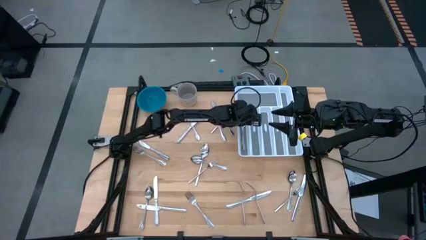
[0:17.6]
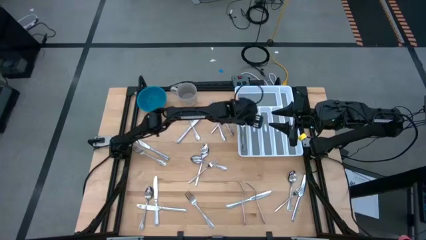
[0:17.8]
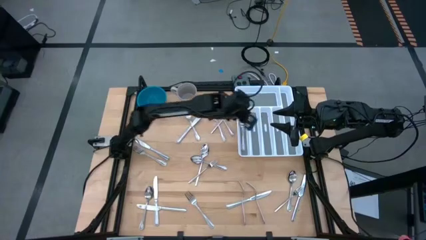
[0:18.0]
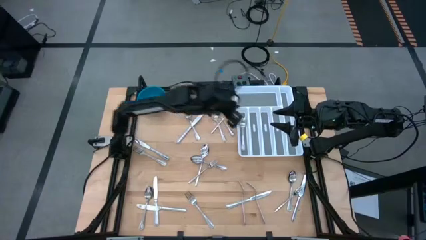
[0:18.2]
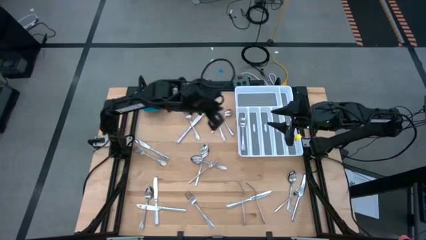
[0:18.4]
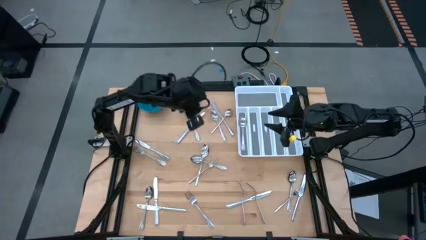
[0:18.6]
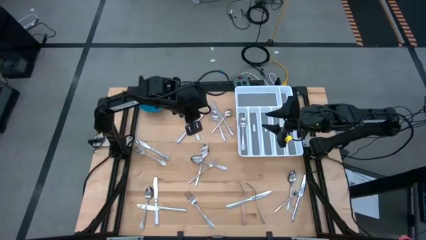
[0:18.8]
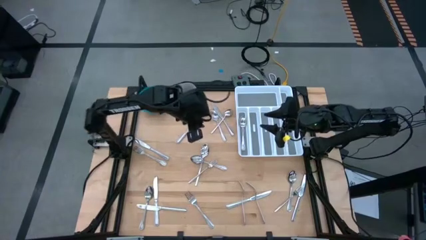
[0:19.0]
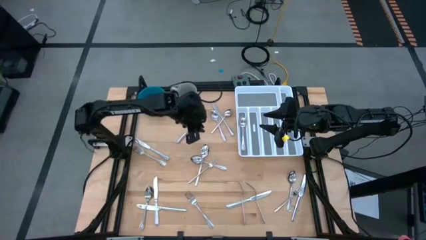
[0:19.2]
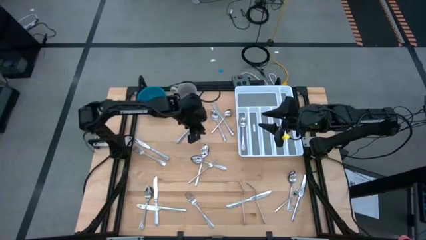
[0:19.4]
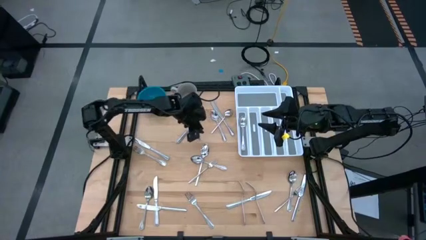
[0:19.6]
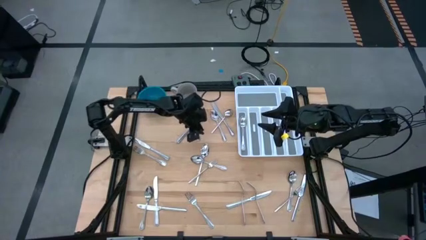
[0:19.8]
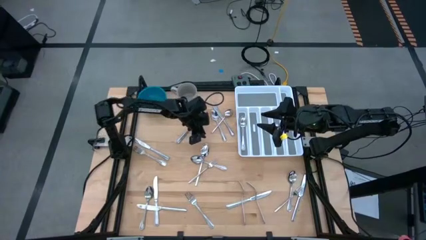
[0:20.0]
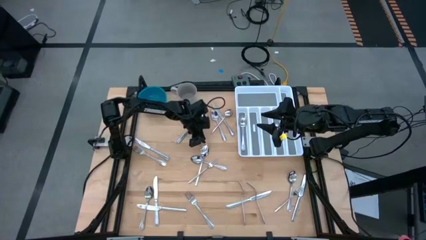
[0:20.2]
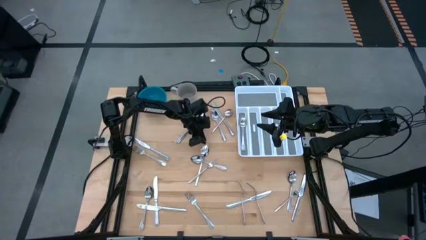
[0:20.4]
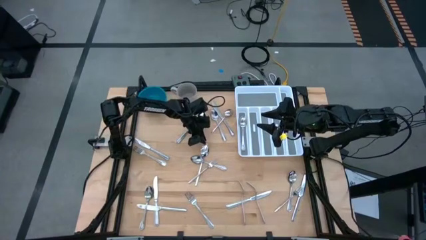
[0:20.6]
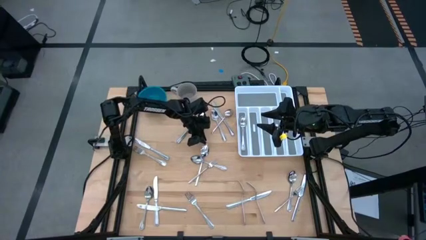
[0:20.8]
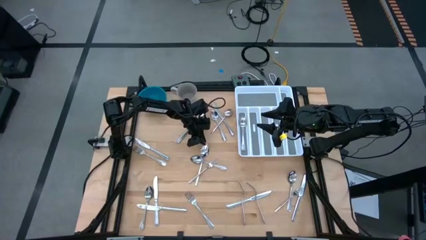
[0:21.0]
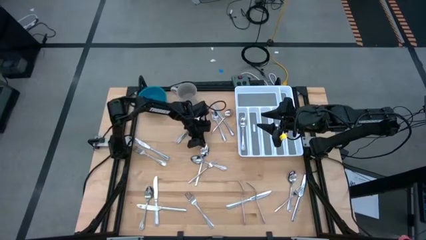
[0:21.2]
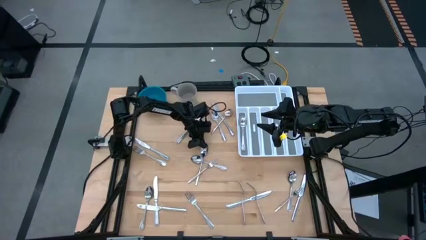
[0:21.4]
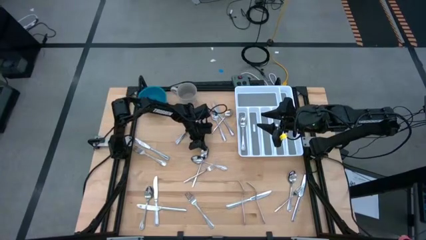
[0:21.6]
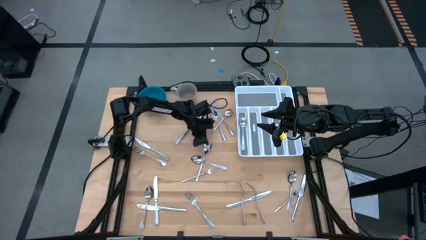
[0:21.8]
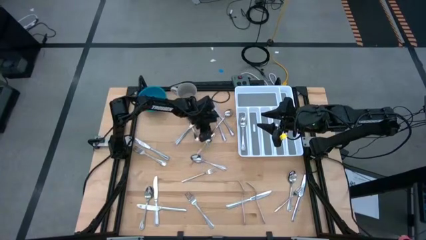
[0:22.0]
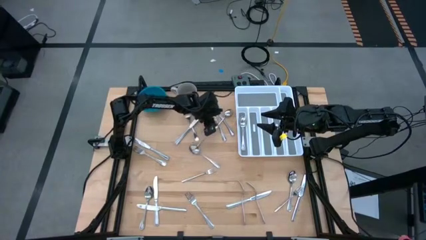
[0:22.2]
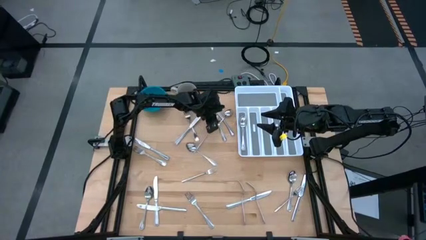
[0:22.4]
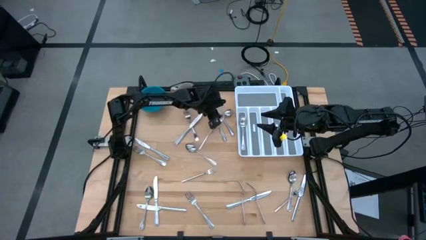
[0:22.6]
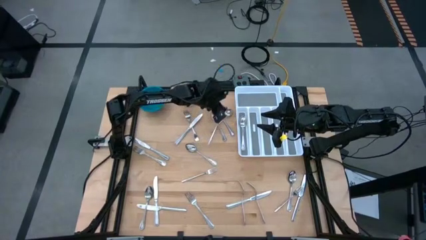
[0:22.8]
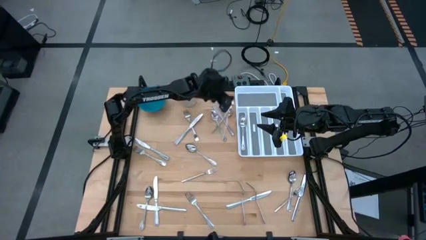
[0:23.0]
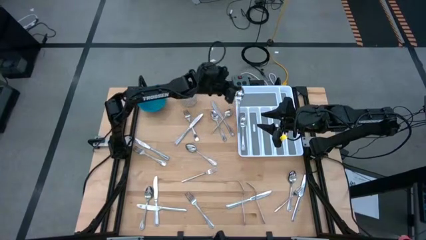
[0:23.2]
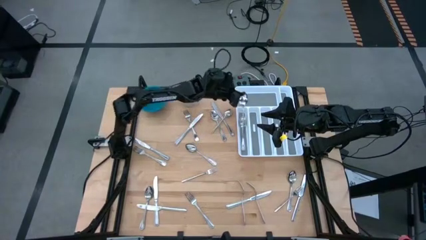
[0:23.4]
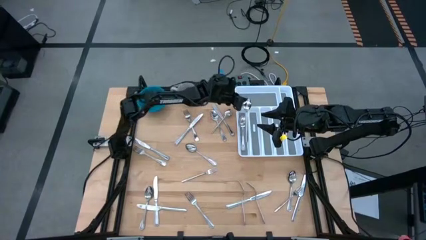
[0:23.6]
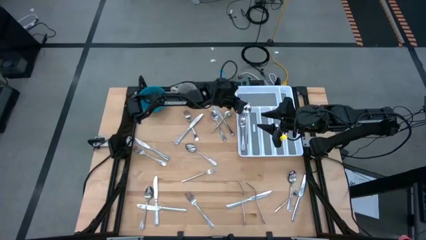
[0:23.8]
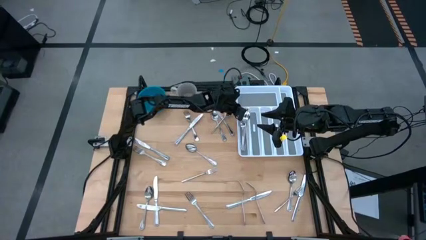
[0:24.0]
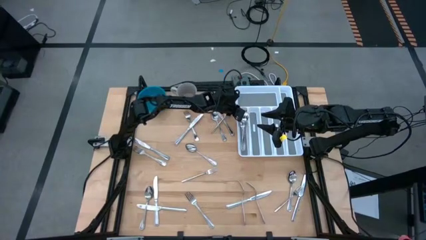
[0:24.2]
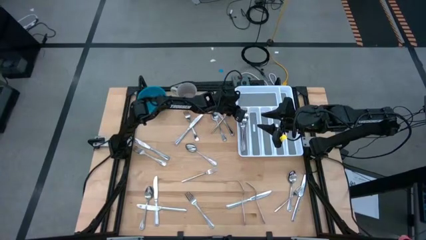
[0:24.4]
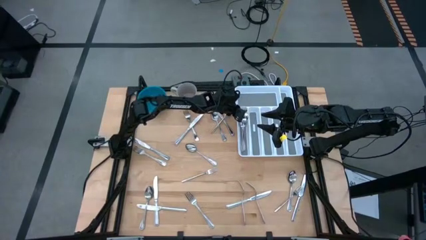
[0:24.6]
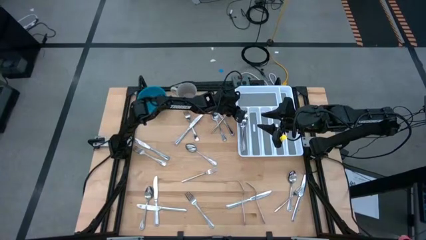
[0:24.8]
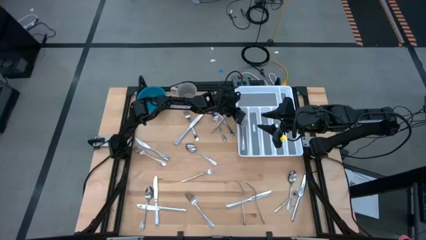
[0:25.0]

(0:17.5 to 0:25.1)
Task: Sort silverware
Put the spoon in the silverware tray

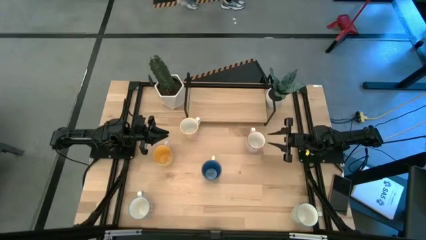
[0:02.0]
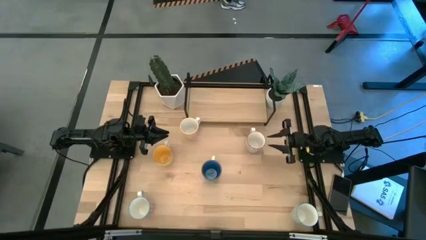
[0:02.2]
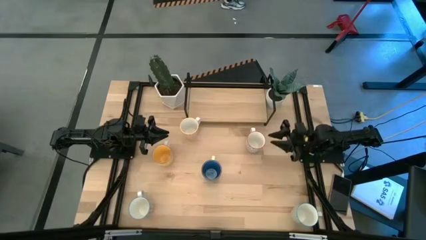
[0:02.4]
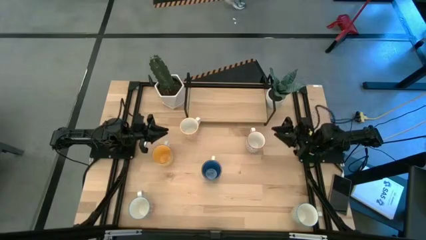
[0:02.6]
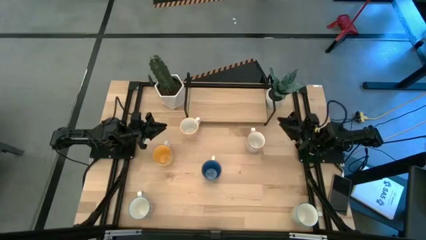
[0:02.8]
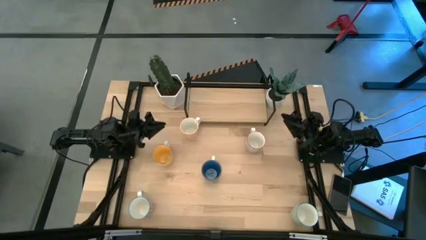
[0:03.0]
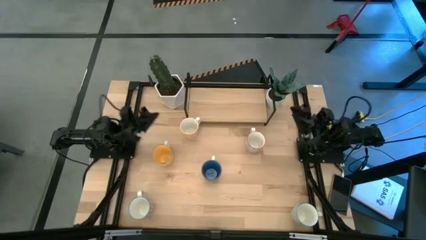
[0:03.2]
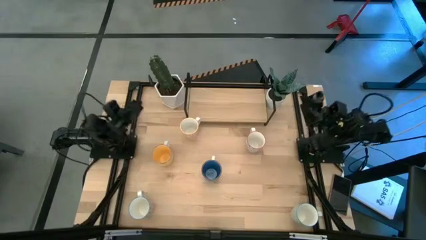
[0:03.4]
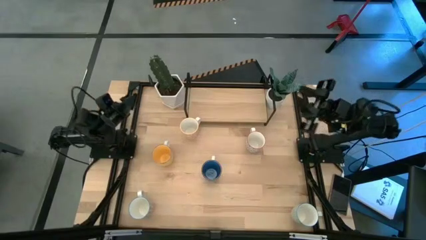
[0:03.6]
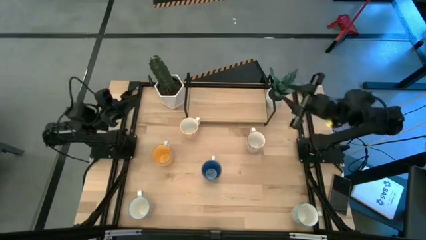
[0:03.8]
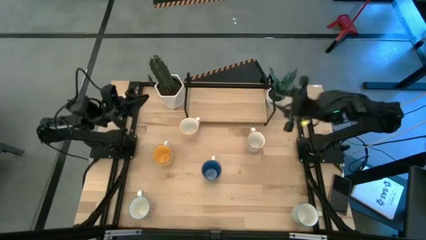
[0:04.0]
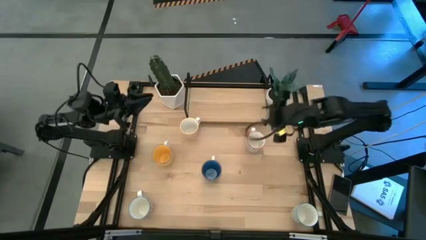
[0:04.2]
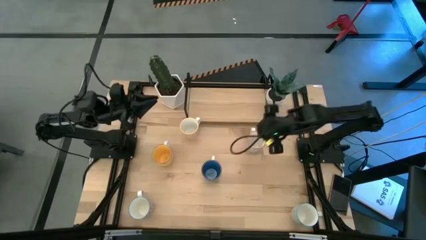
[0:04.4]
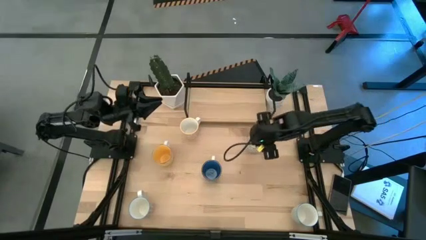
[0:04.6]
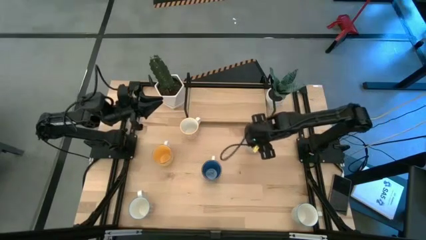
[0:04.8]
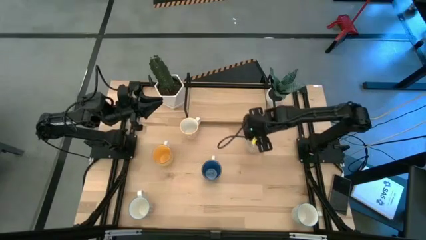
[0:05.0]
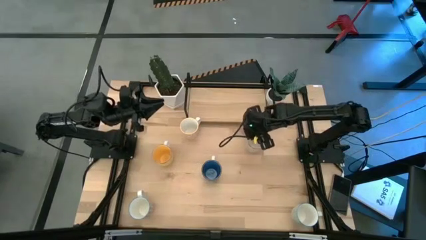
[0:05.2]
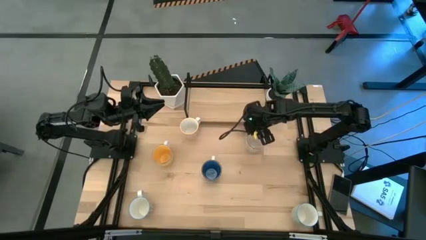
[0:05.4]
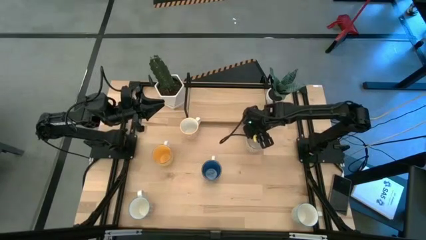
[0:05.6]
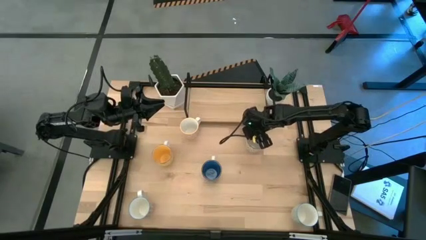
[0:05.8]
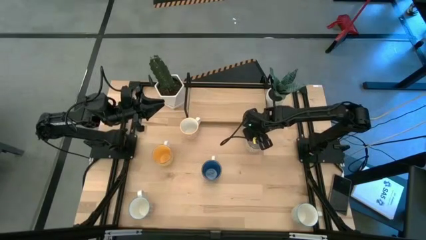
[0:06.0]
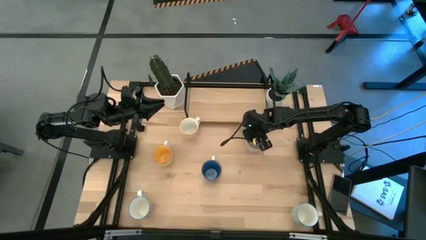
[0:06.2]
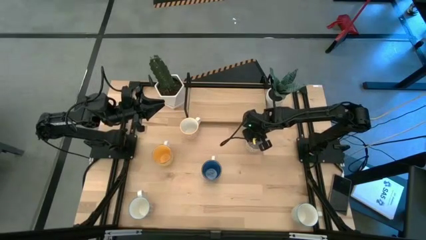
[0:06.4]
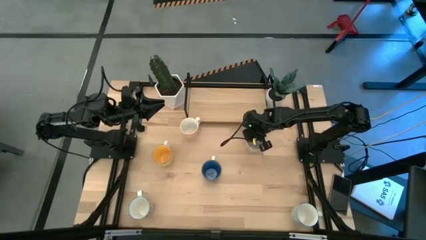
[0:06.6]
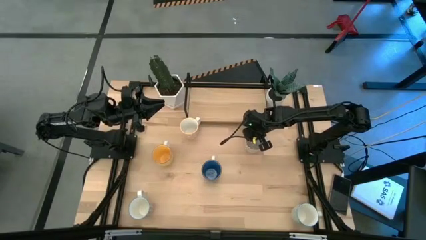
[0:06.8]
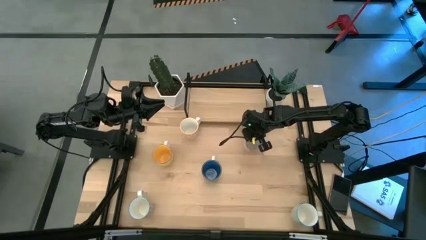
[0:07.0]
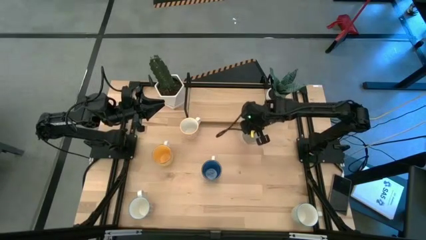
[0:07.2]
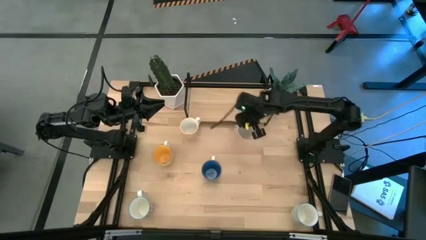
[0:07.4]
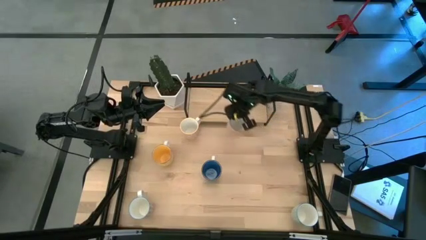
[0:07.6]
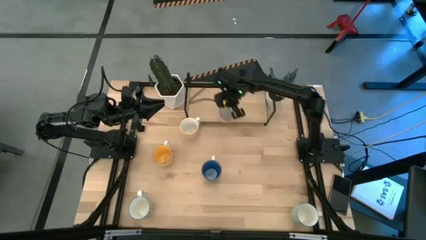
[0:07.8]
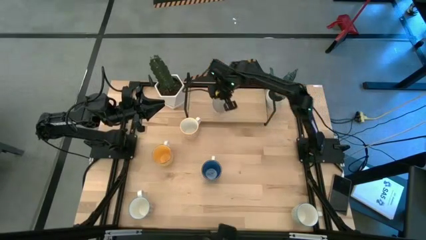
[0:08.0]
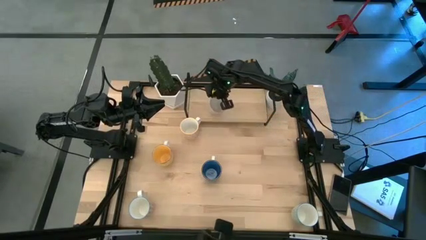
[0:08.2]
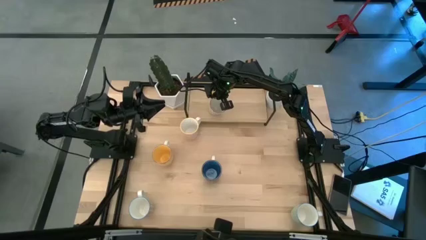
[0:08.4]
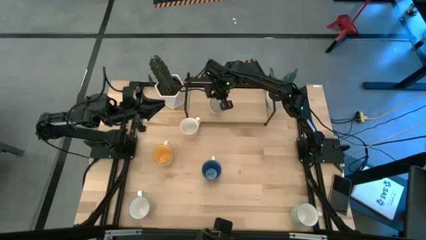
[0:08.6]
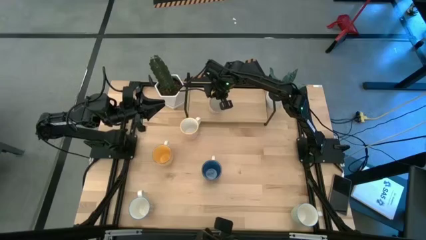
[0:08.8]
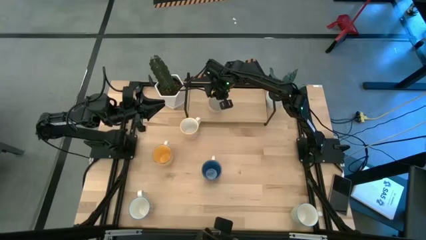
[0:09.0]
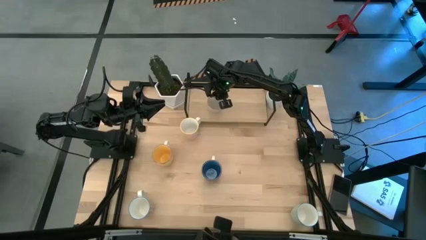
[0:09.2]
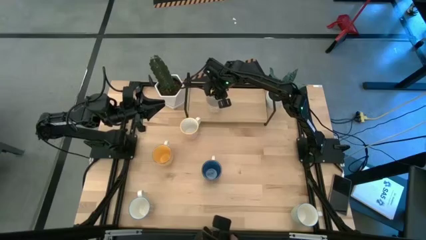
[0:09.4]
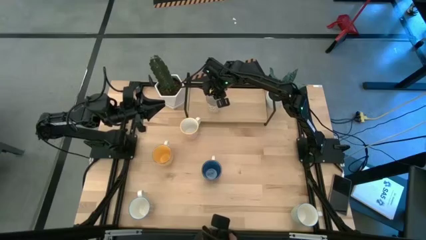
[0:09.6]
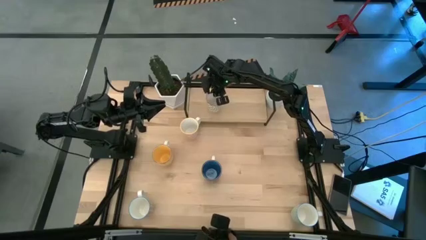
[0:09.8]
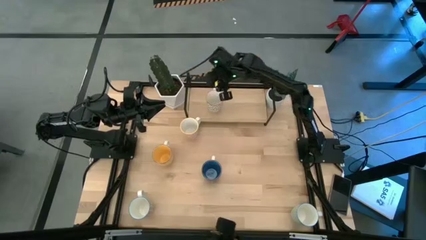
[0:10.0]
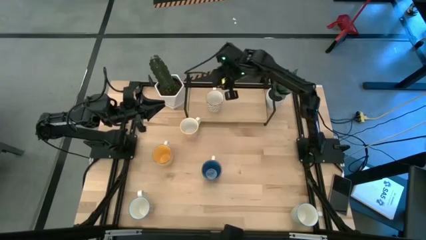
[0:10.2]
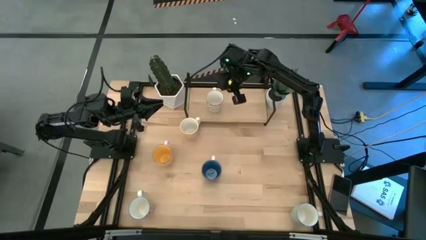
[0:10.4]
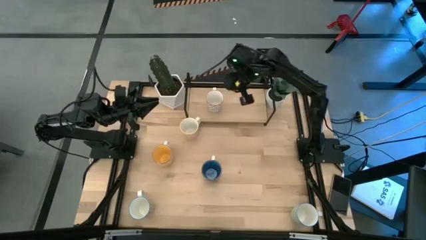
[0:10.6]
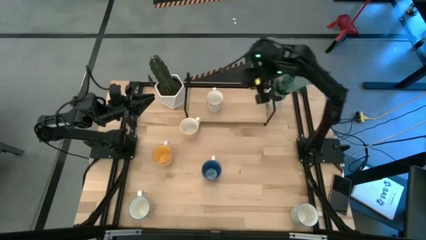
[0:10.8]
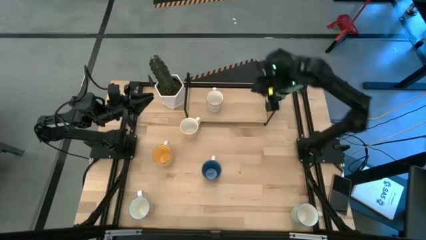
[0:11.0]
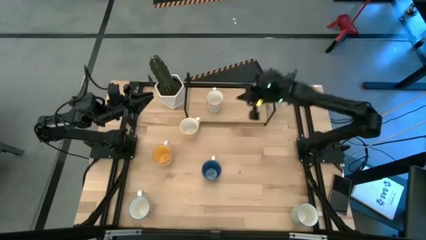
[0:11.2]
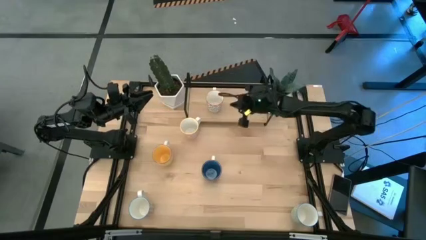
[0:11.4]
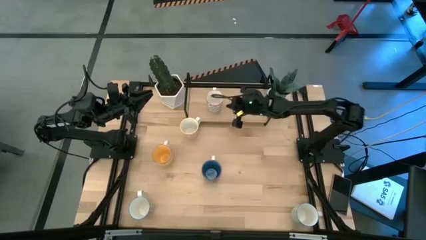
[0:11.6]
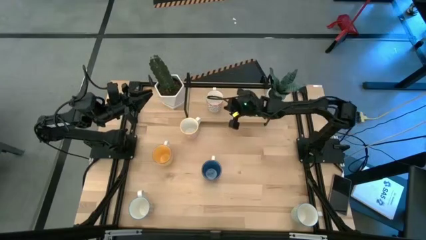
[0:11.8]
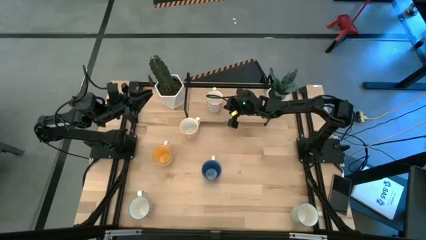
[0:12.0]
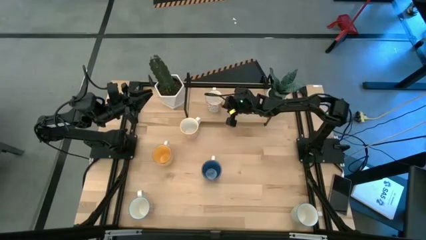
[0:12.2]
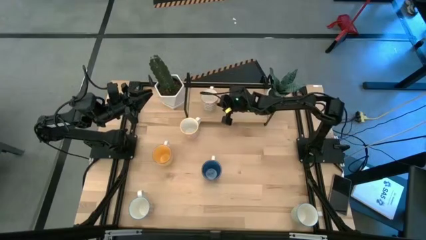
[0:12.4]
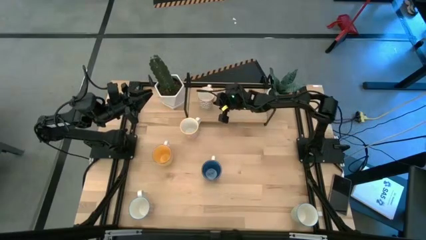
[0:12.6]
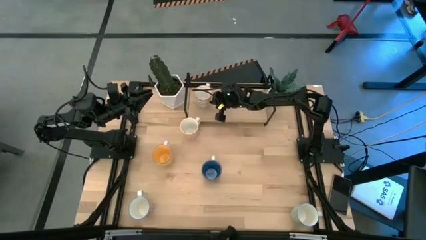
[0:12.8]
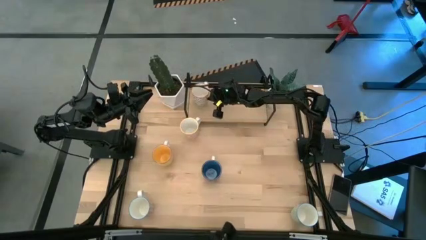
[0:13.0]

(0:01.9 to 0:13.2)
Task: Place coffee mugs
Put the gray patterned mug on the shelf
